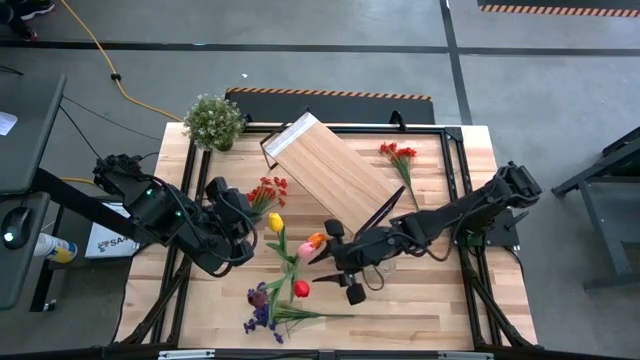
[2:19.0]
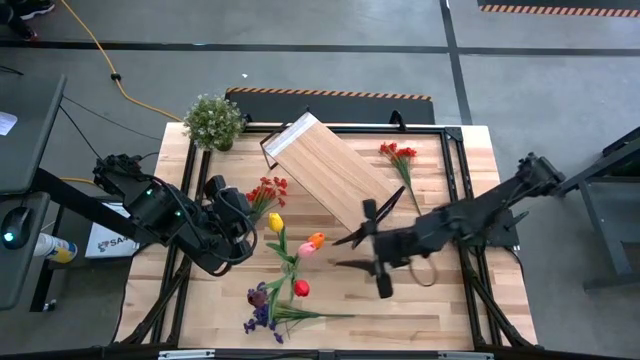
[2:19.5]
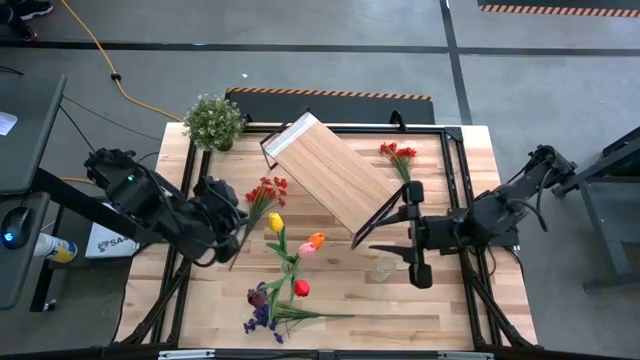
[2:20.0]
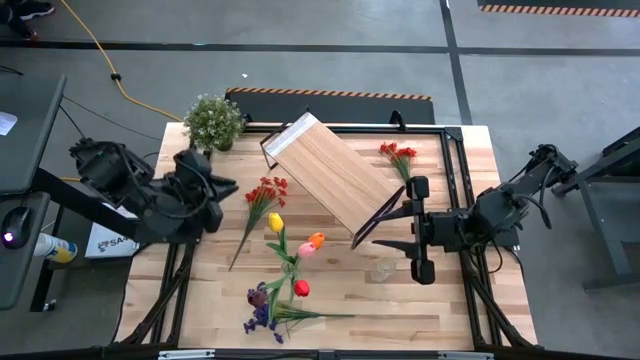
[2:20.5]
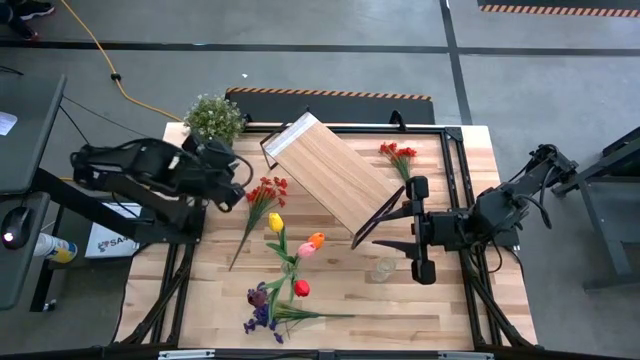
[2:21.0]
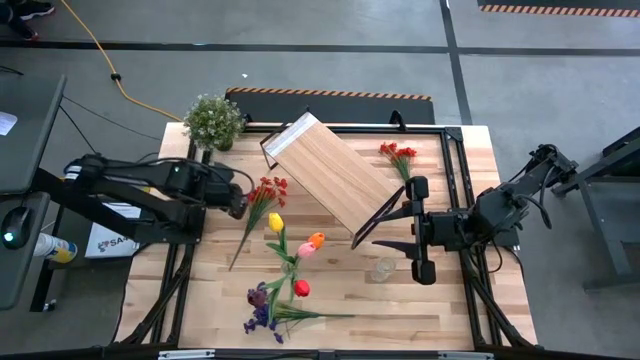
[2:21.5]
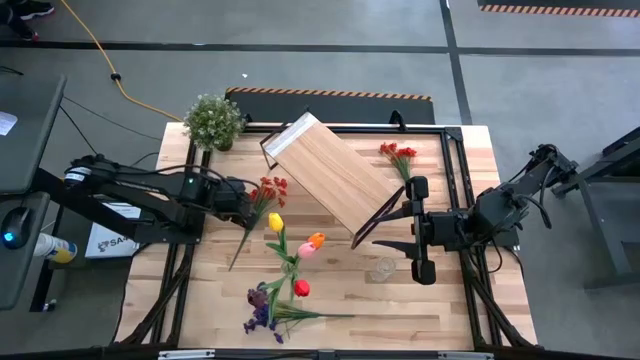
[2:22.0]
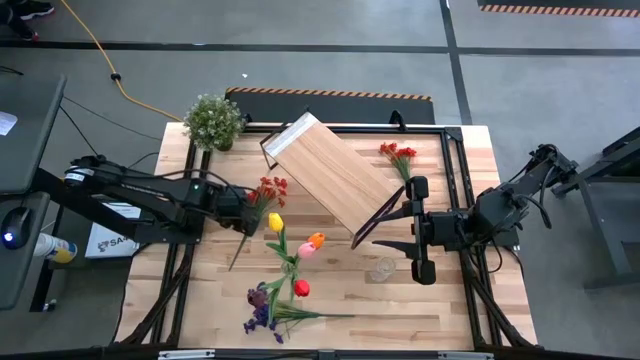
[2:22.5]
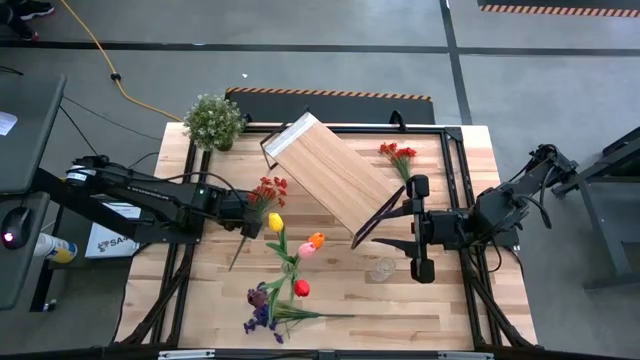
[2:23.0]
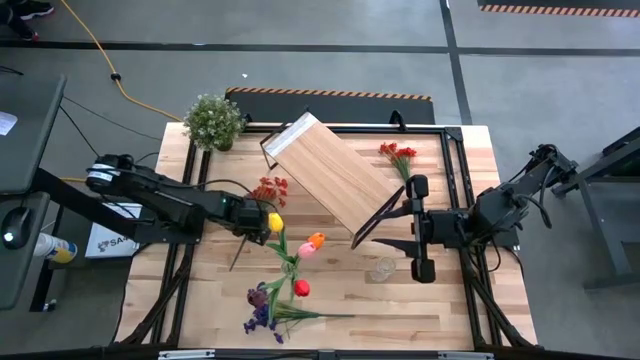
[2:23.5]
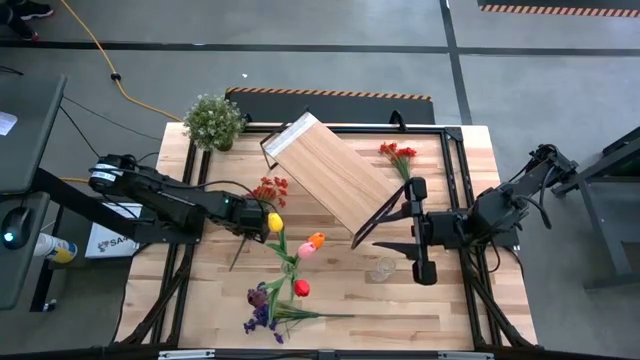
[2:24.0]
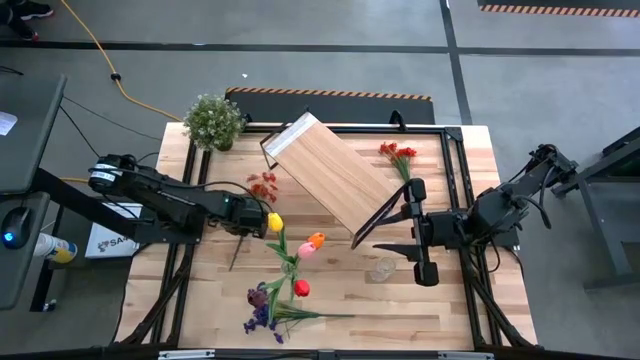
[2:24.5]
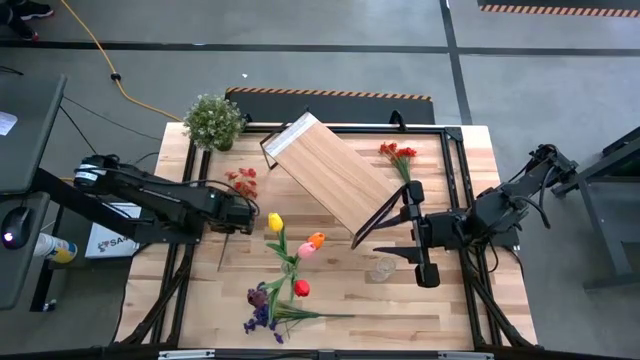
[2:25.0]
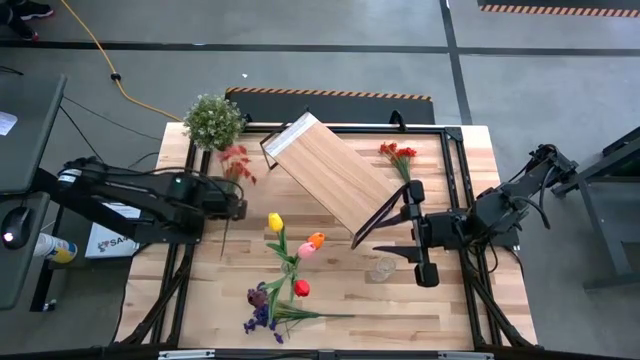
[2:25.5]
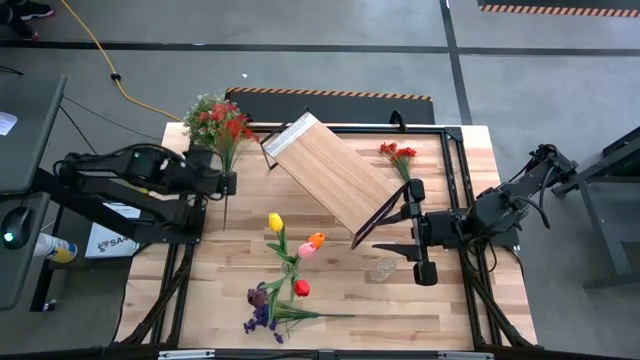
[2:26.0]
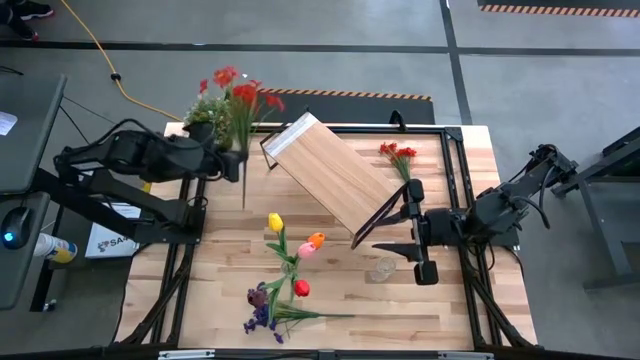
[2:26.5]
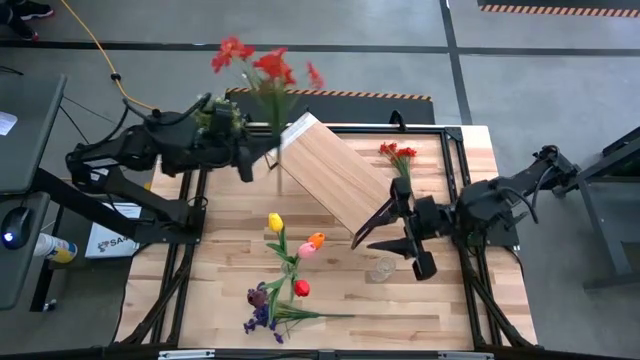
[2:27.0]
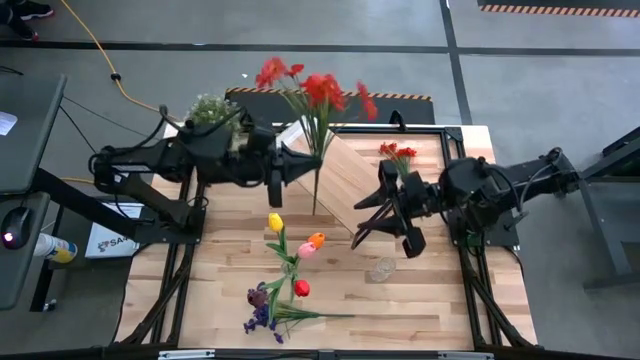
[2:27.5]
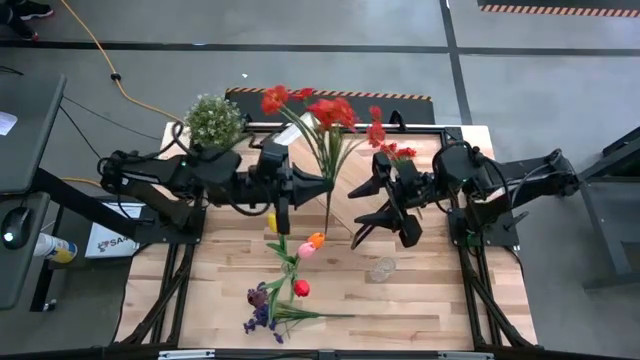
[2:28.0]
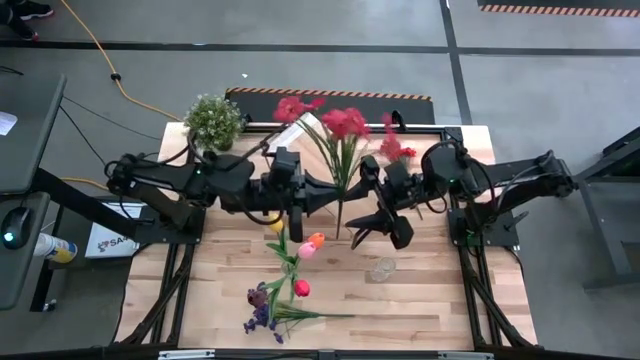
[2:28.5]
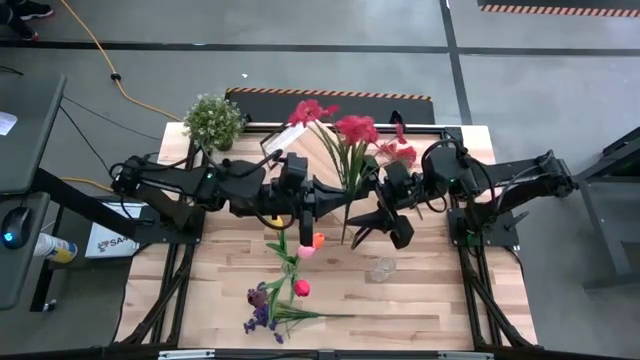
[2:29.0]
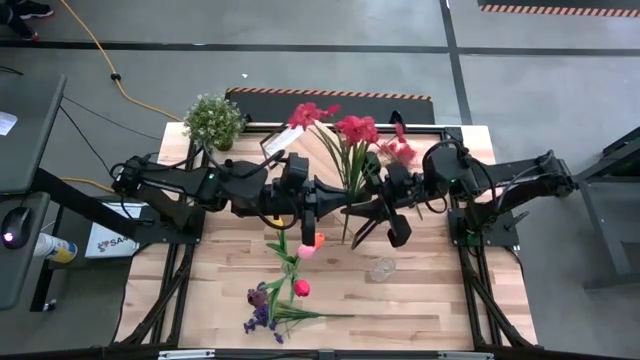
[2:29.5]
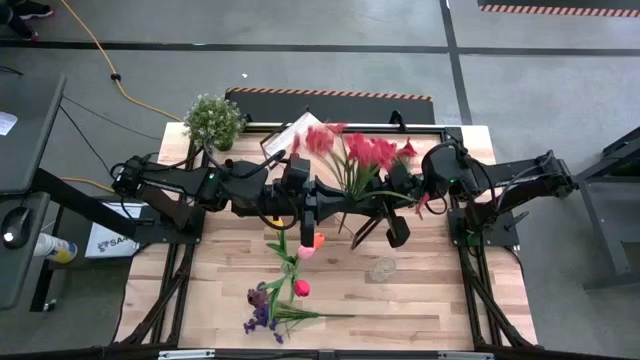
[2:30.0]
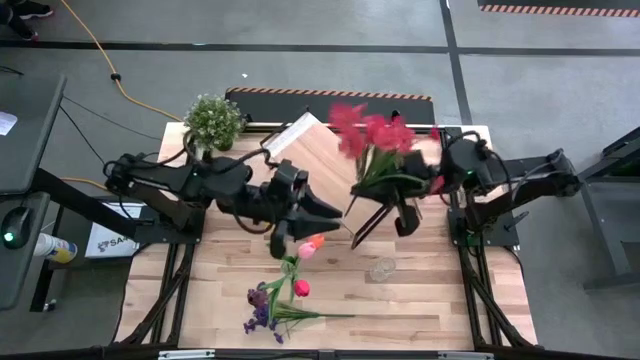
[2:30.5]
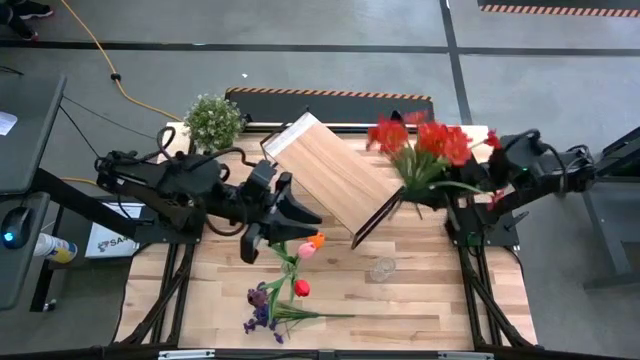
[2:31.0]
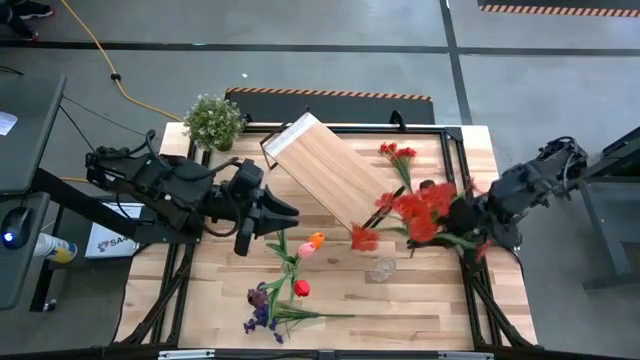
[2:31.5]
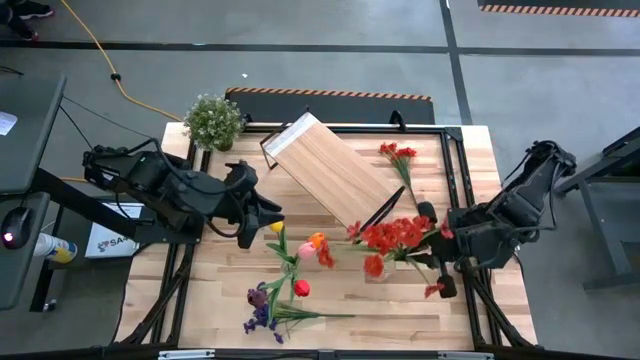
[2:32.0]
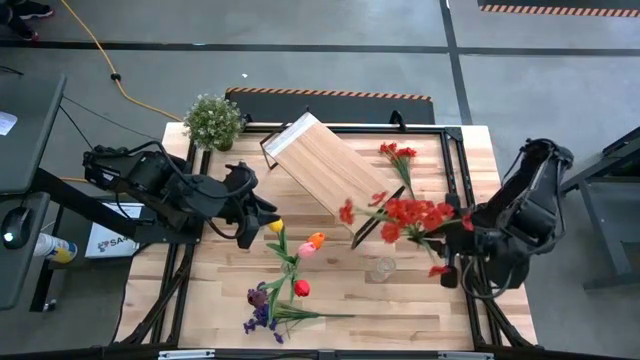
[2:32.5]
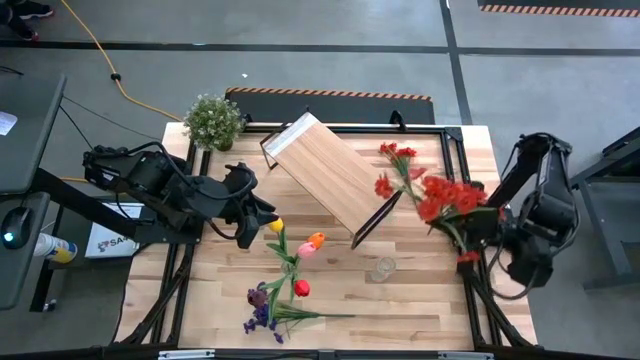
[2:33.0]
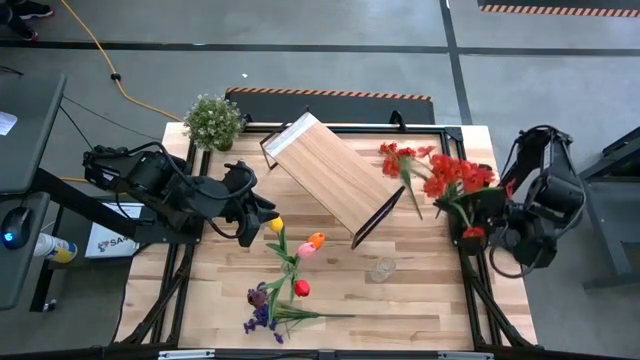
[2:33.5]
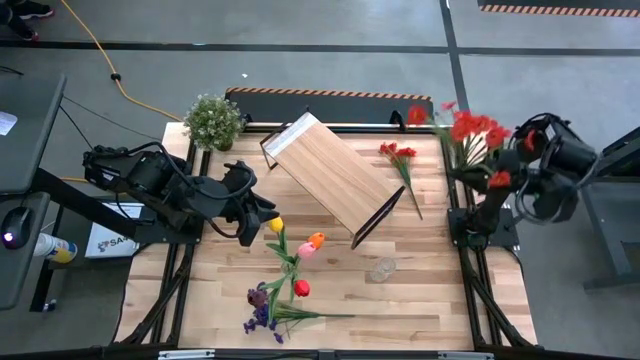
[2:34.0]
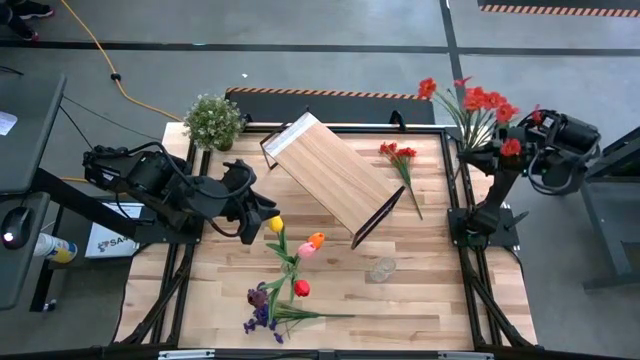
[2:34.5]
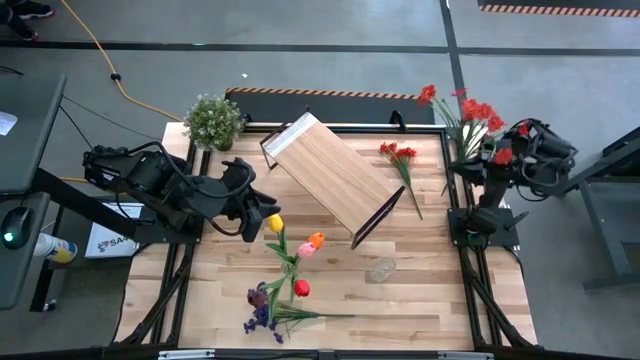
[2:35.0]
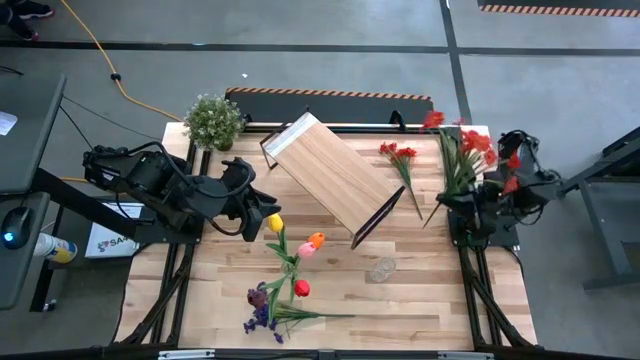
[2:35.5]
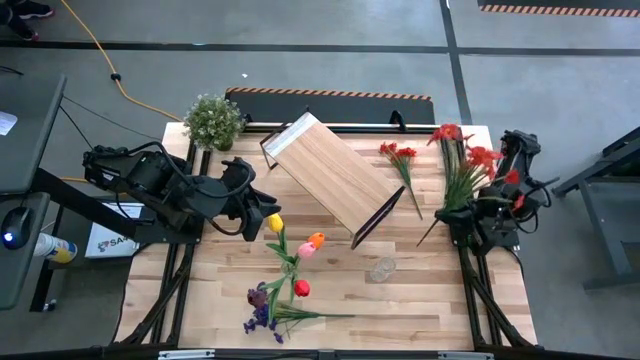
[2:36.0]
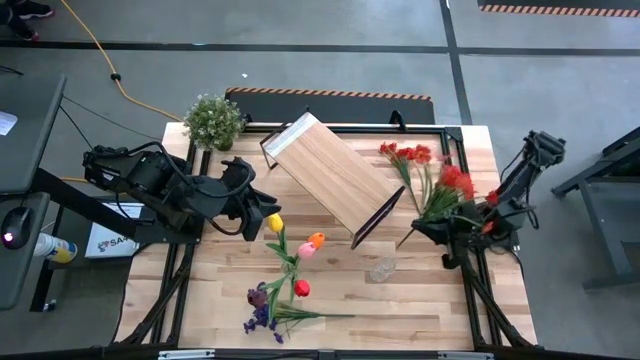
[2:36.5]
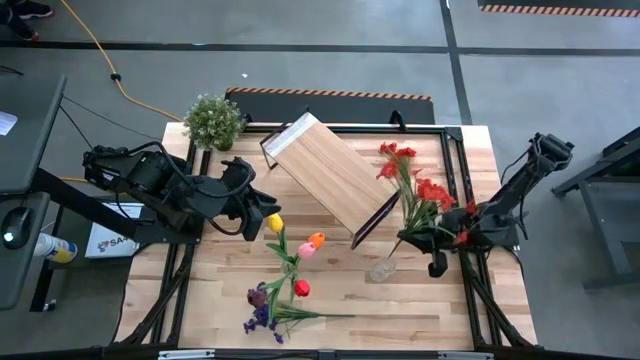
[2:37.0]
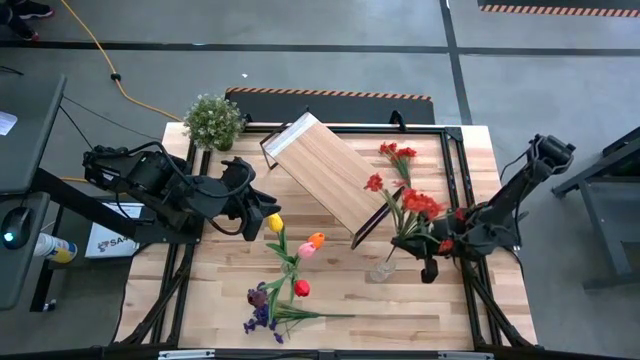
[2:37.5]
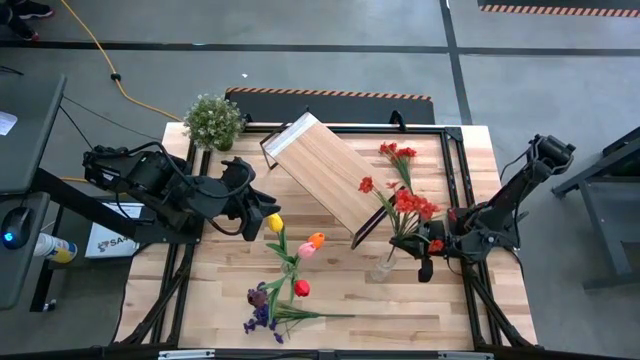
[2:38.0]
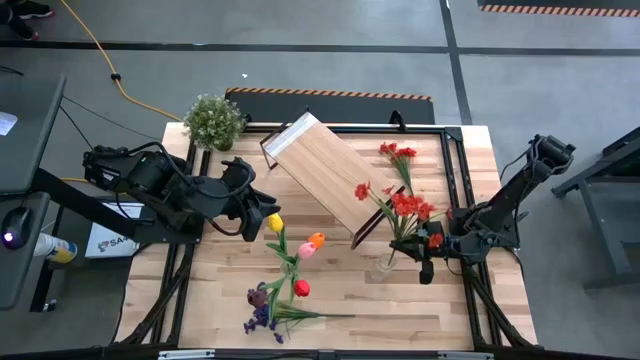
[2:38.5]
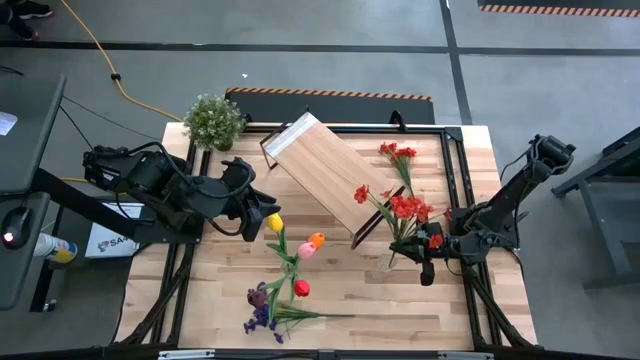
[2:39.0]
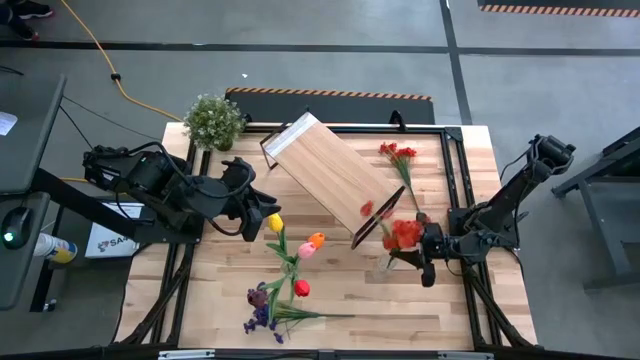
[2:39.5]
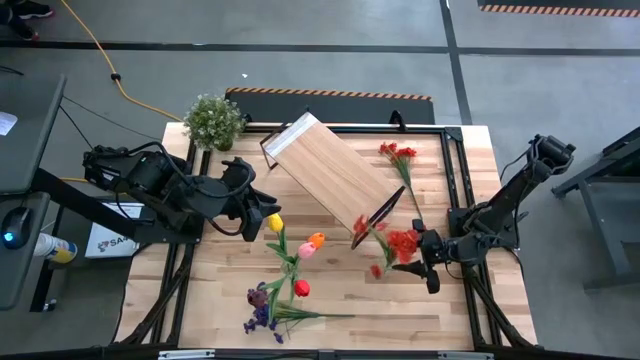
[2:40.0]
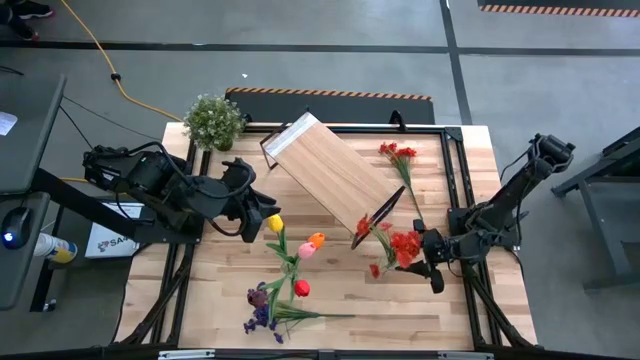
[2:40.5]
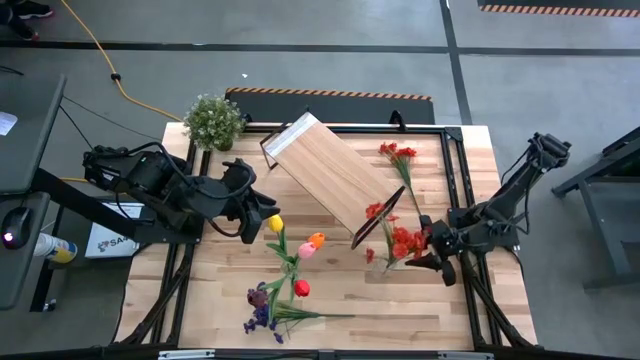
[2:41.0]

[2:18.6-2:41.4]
Task: Pick and place flowers into a vace then onto a shelf
Put the left orange flowers into the right transparent vase
